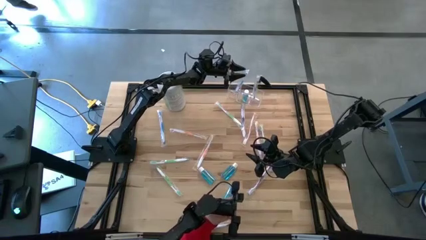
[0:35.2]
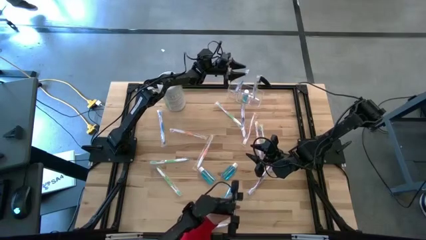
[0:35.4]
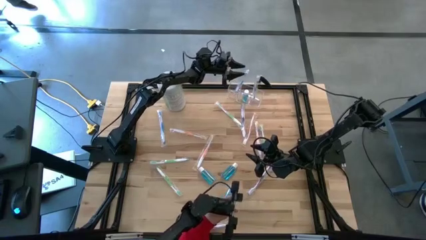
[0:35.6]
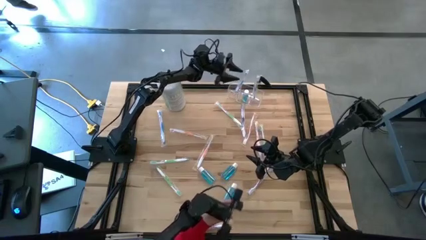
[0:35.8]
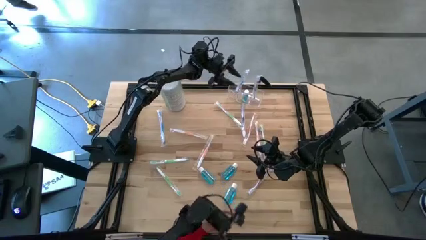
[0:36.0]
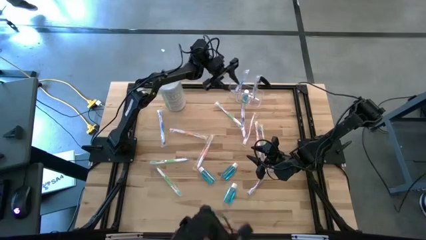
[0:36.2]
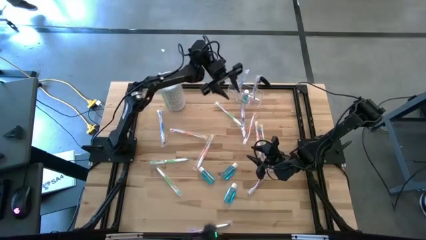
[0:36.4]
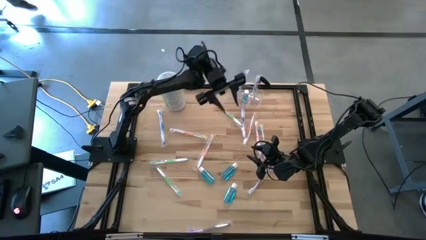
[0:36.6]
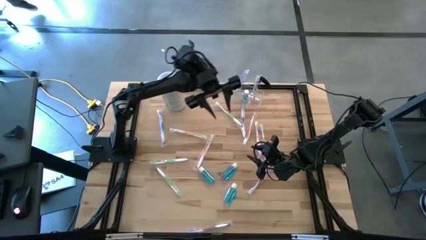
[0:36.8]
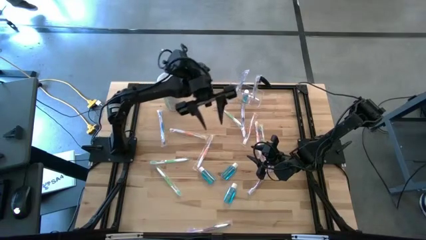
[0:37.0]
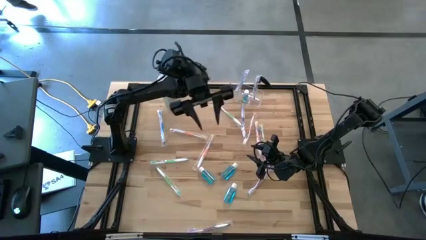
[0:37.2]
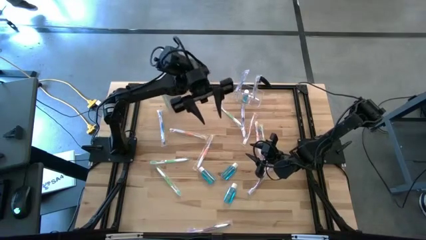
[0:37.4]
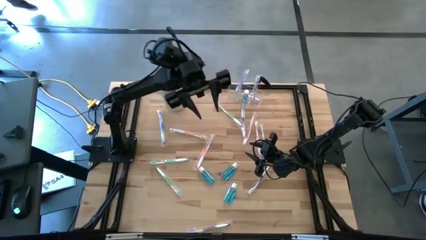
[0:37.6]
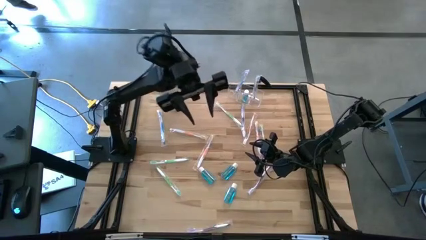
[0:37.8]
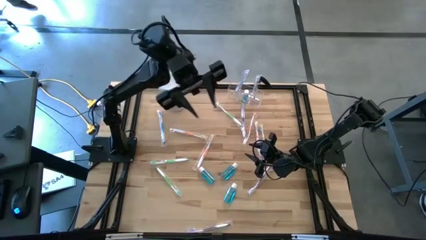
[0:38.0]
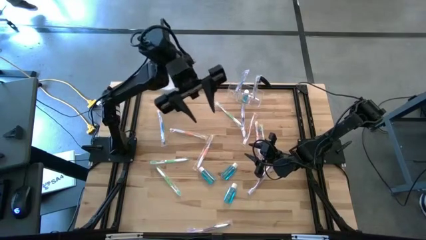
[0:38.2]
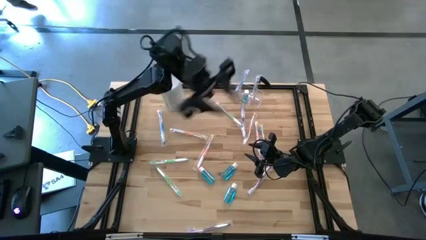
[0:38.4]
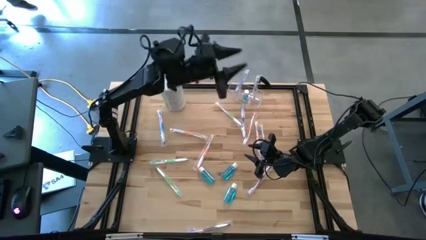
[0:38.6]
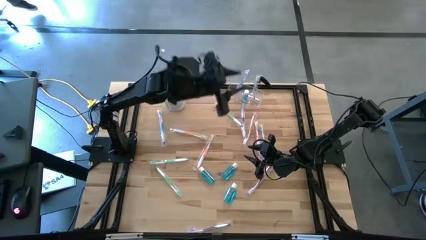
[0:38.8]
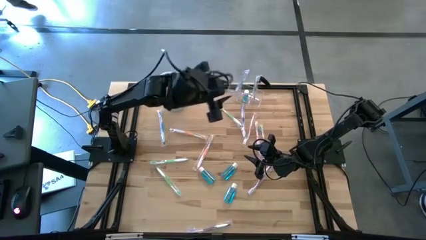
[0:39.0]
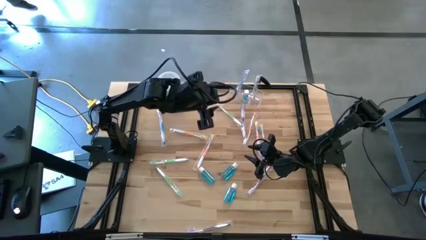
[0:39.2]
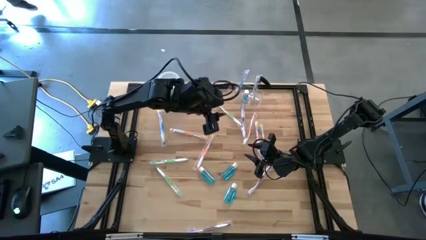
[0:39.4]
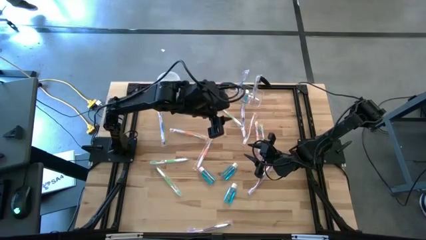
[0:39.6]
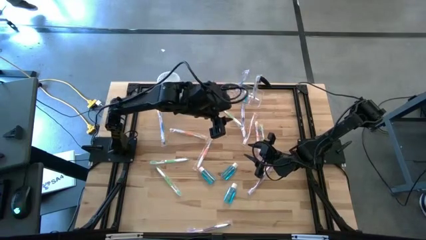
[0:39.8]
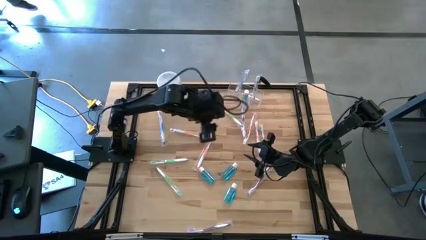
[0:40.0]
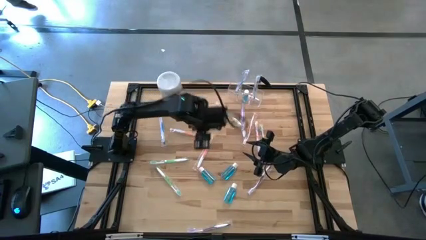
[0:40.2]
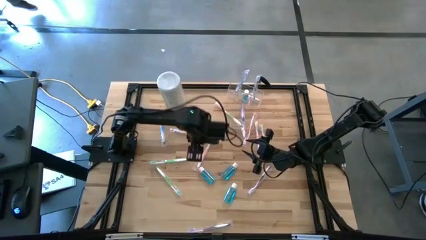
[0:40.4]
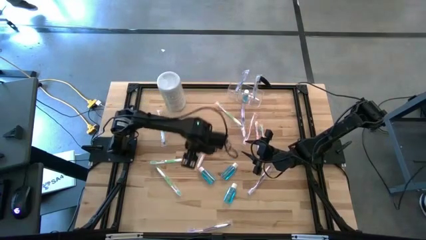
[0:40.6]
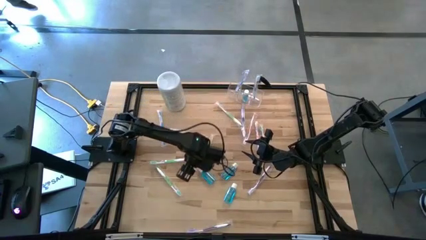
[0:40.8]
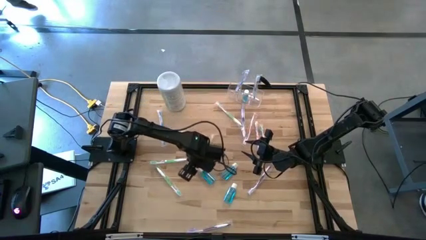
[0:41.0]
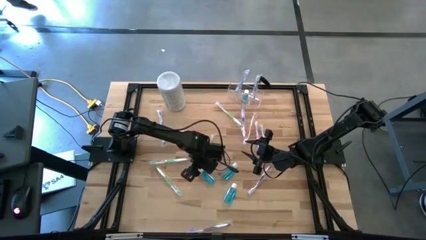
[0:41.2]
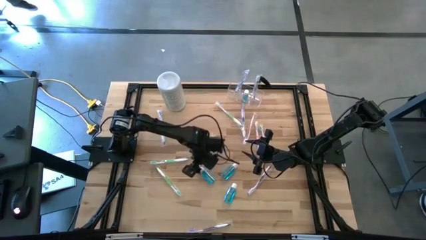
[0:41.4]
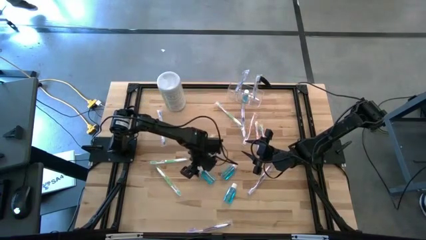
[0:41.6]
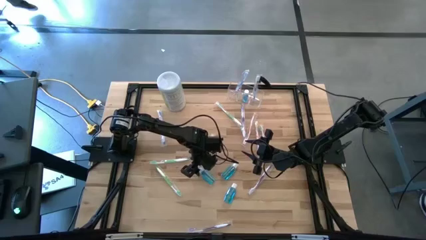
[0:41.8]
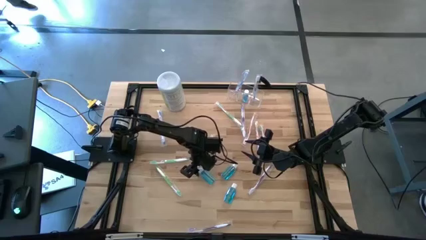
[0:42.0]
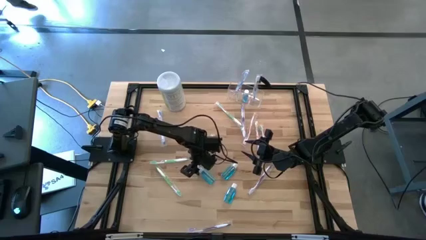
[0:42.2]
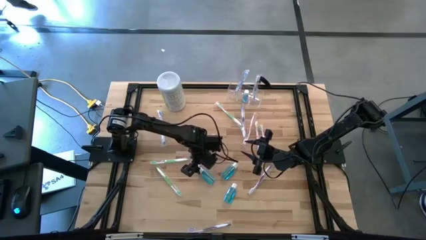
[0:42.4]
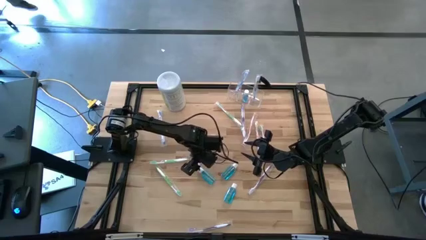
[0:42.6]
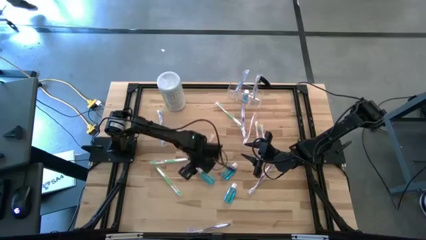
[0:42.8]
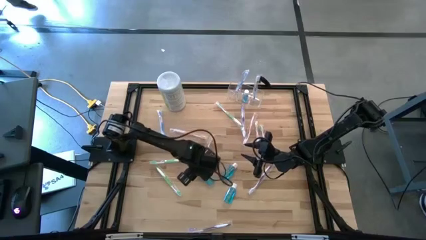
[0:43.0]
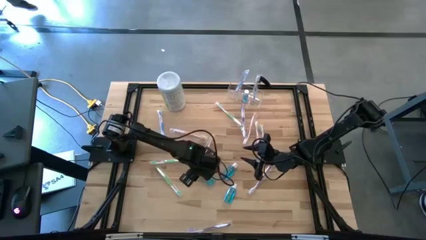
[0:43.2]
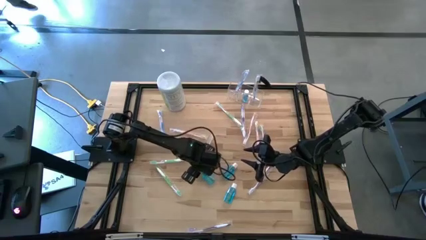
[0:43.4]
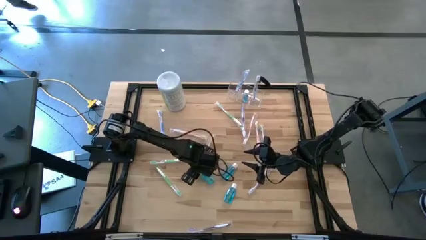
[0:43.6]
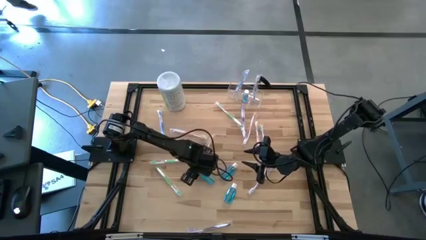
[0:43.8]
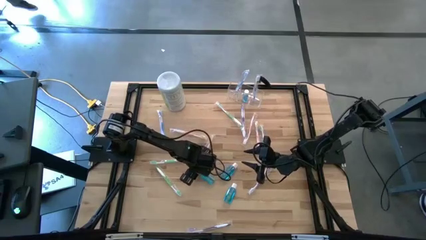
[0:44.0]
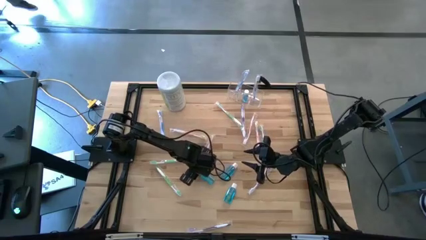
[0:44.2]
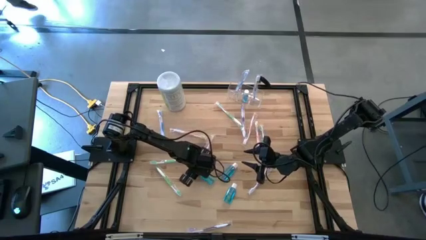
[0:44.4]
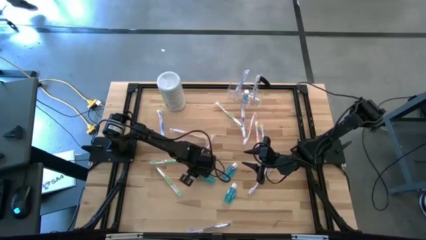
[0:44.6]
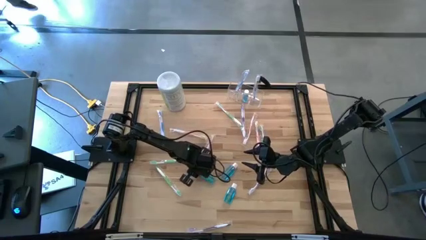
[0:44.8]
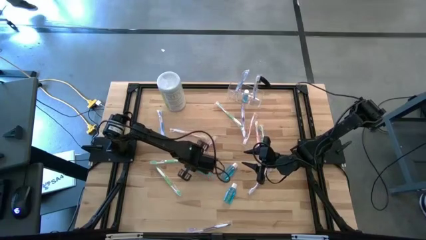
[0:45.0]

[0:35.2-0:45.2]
Task: Pick & Place toothbrushing station
Put the blue mouthwash into the transparent organizer

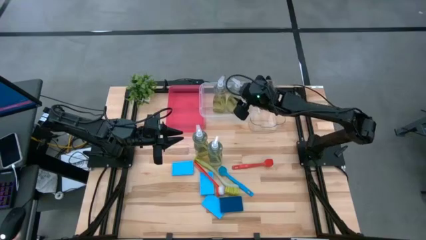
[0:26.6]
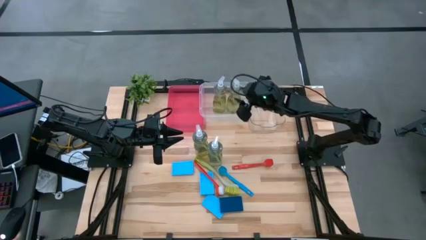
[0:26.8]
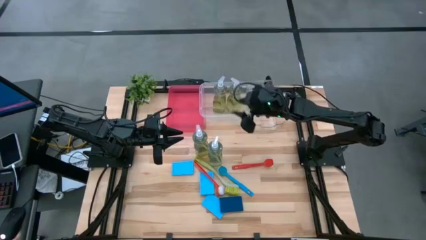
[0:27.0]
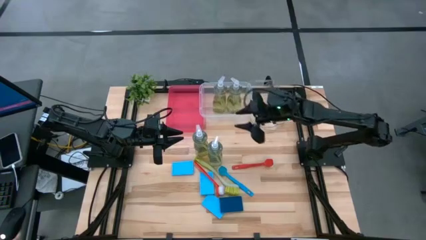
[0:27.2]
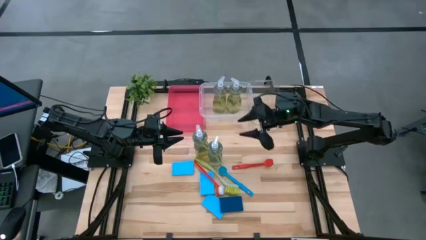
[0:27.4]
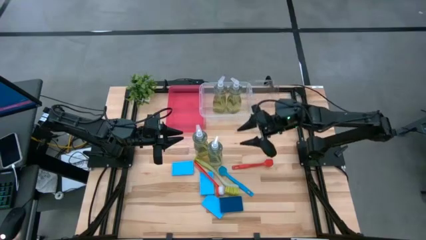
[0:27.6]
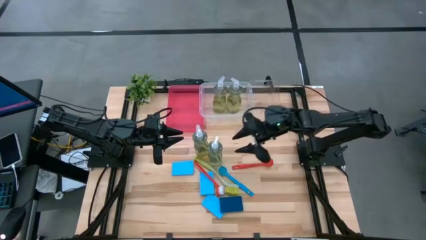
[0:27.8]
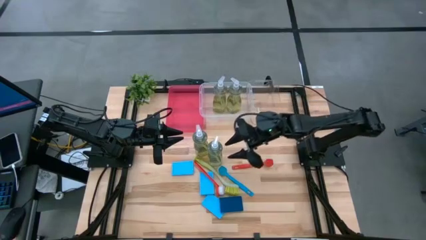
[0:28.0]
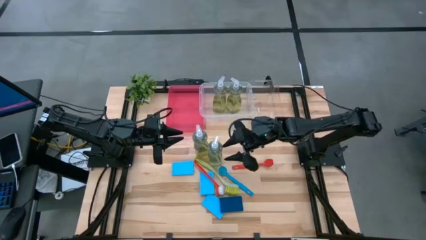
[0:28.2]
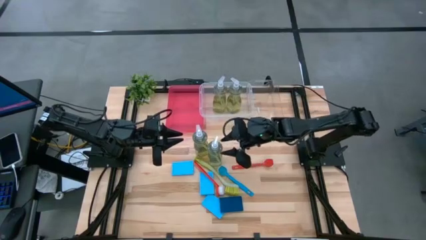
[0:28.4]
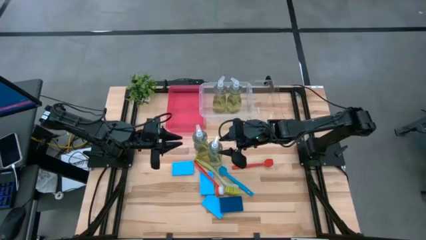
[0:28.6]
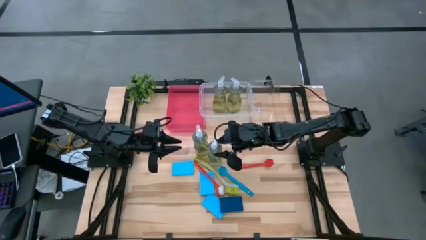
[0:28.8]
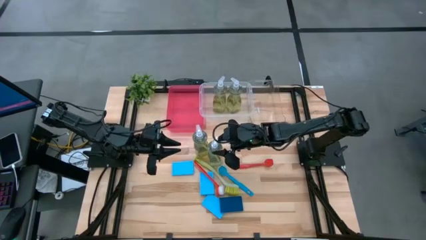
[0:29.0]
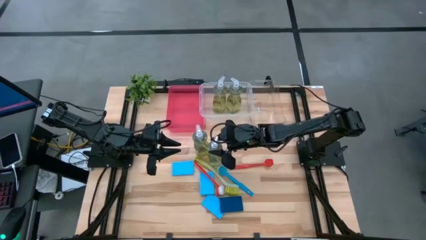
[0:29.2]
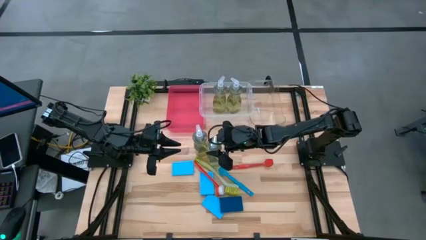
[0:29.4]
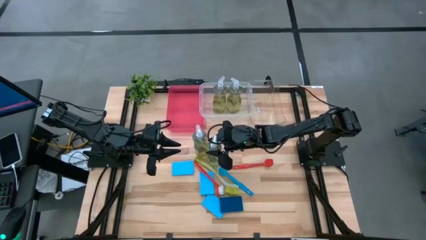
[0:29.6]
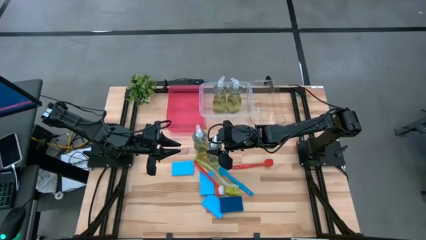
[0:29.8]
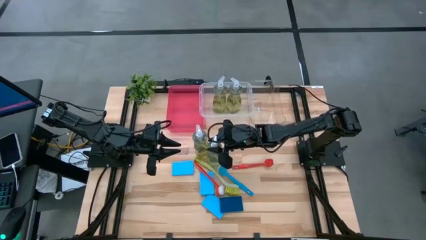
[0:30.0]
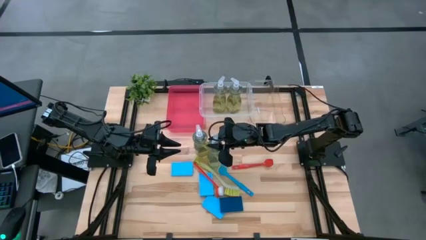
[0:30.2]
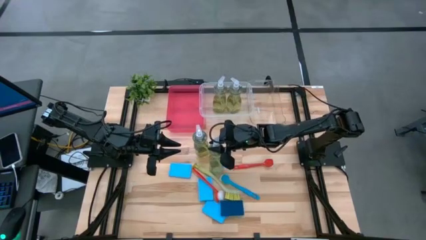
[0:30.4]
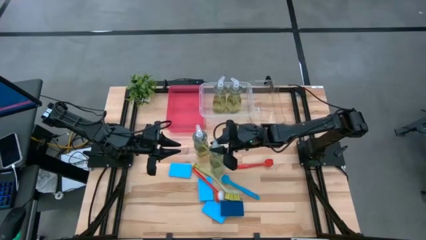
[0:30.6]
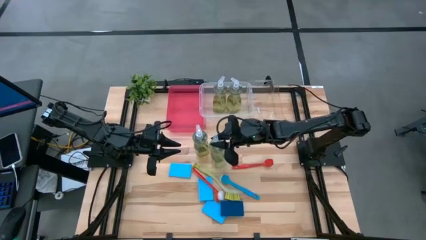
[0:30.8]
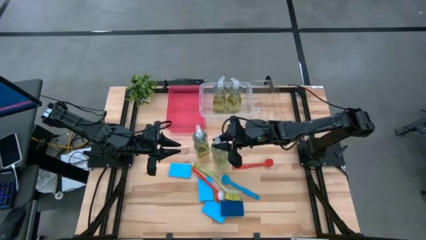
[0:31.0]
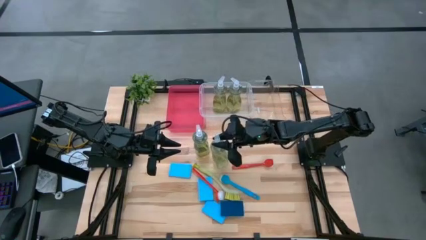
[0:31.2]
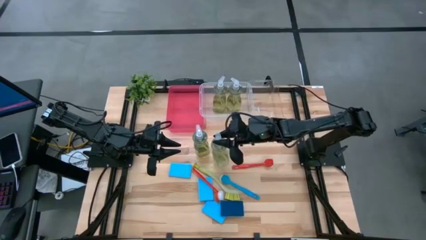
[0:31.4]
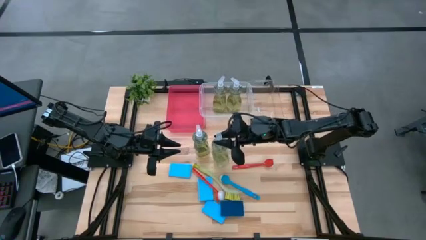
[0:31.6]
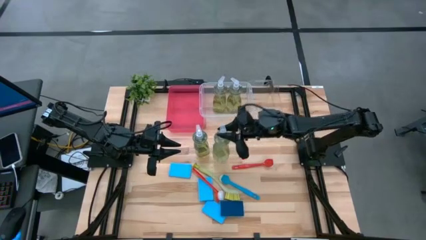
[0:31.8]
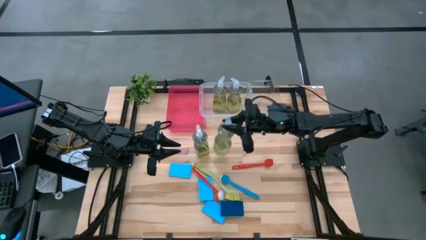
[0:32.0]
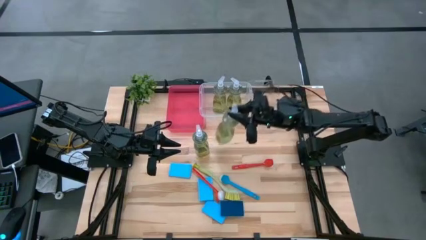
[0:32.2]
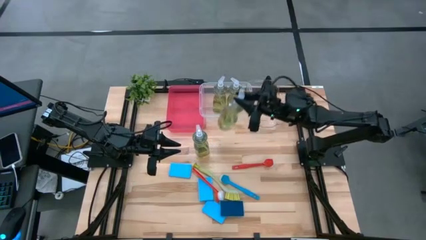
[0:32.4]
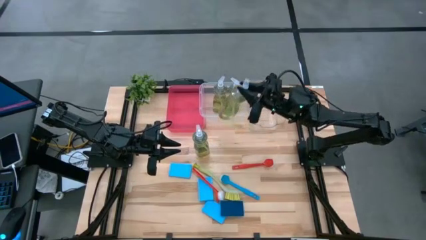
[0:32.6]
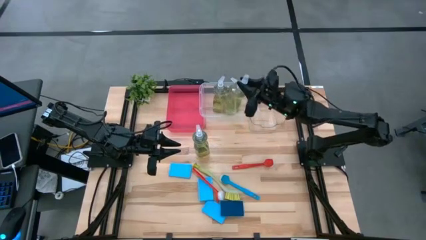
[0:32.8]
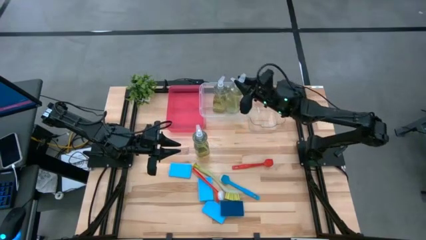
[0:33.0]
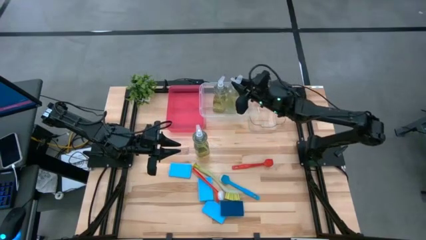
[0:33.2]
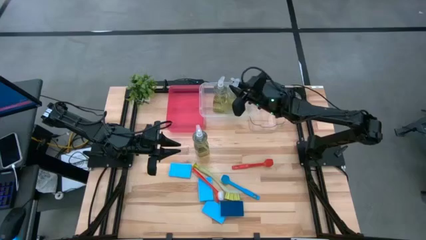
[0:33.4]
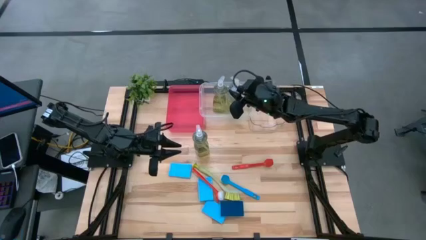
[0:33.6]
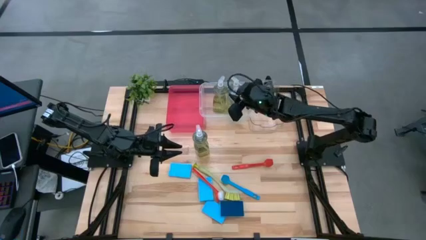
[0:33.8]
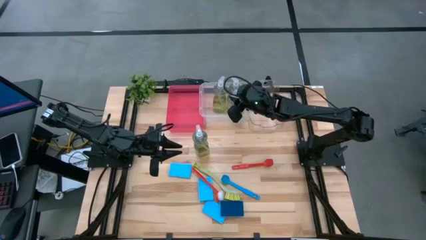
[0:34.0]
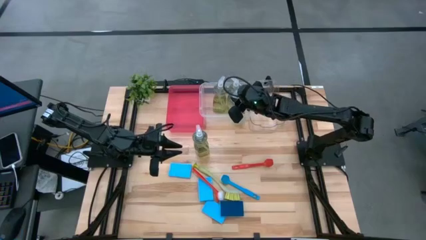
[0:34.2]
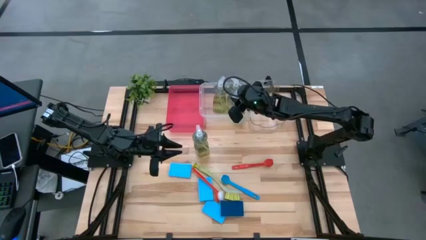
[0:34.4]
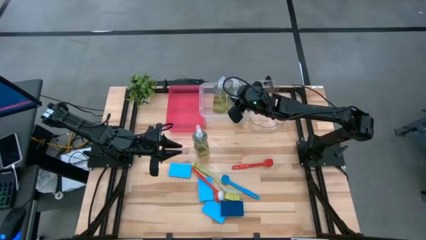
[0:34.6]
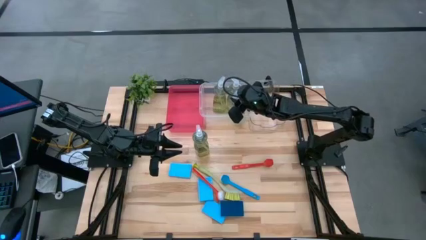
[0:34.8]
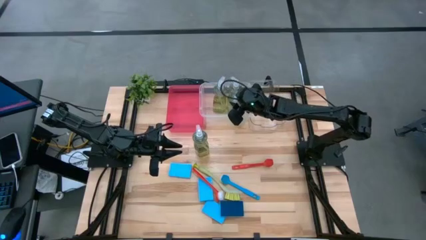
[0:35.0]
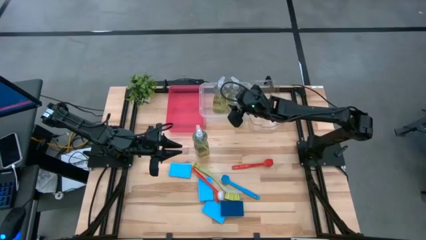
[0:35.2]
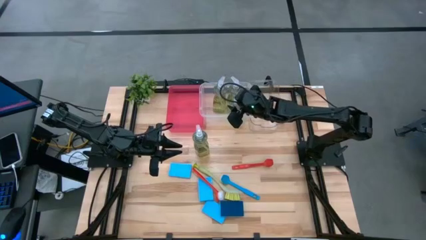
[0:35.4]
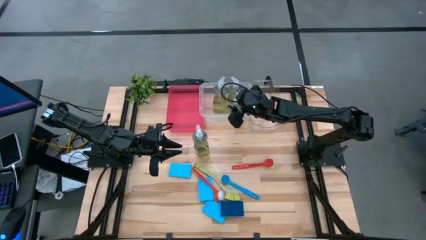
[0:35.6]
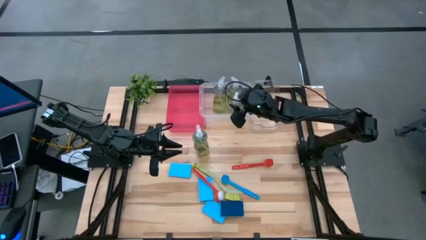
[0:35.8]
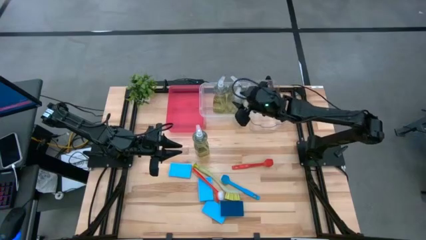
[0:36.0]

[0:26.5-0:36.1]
Task: Pick & Place Kitchen Sink Supplies
Put the green dishwashing liquid into the white bin
